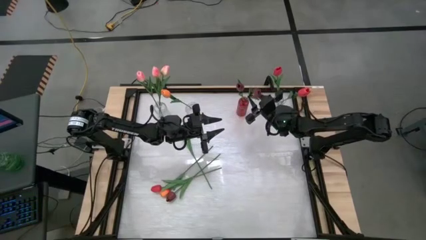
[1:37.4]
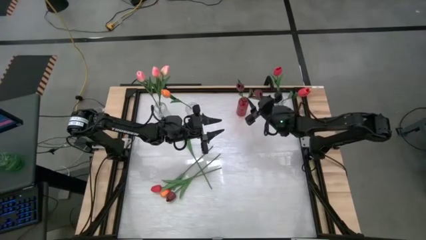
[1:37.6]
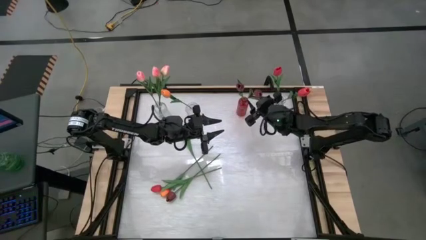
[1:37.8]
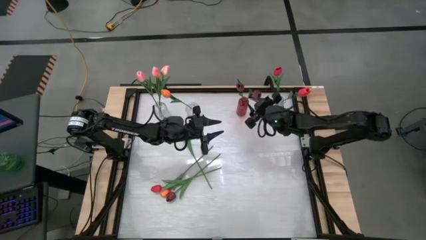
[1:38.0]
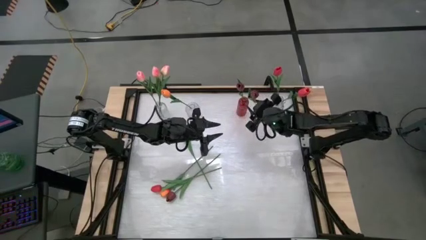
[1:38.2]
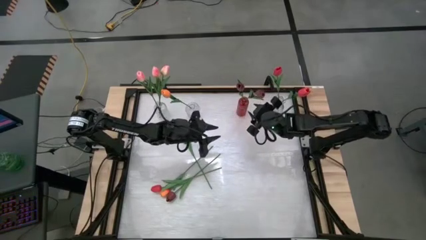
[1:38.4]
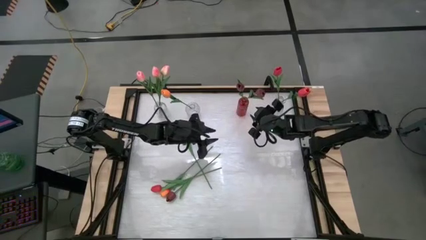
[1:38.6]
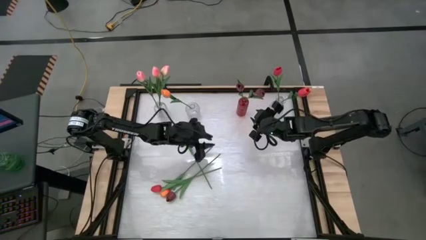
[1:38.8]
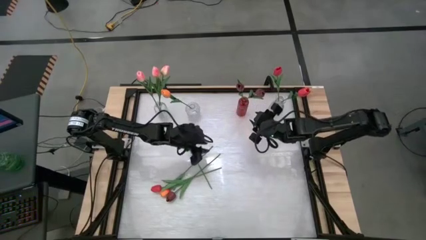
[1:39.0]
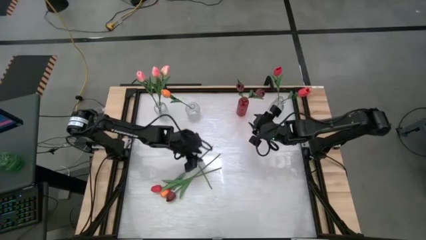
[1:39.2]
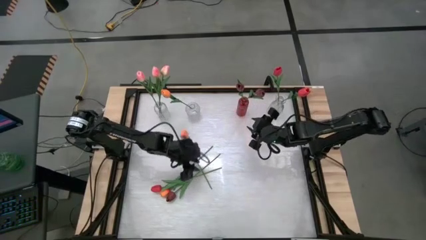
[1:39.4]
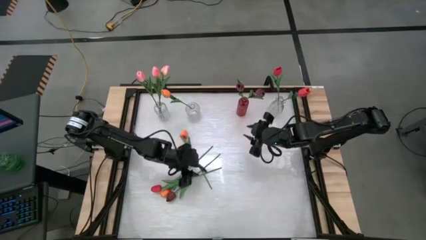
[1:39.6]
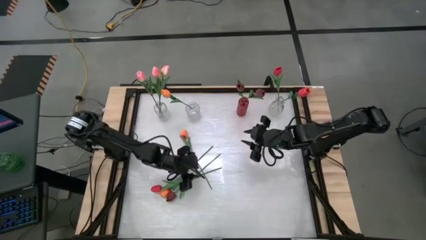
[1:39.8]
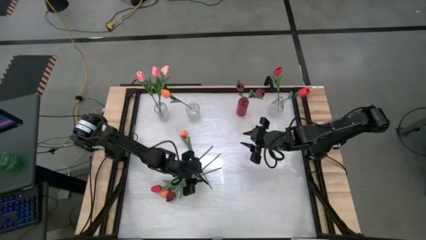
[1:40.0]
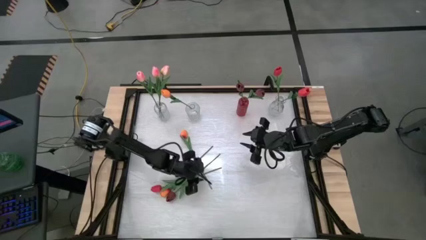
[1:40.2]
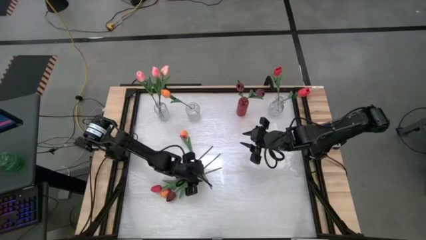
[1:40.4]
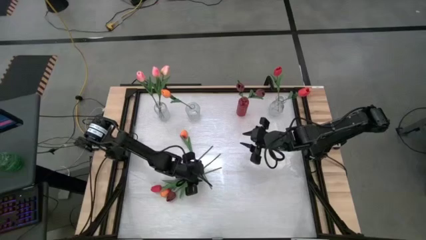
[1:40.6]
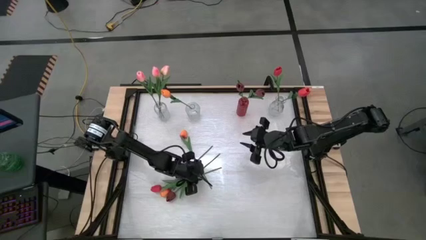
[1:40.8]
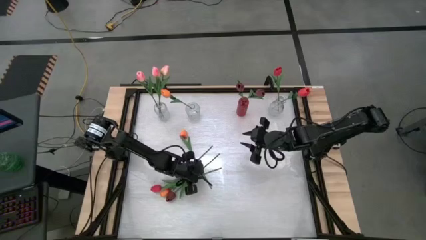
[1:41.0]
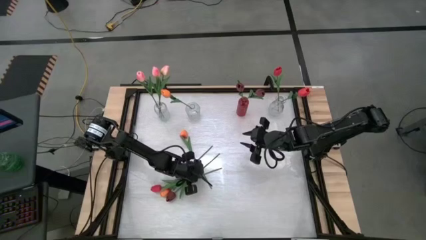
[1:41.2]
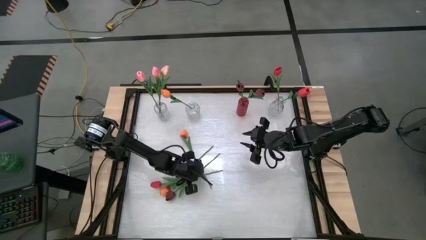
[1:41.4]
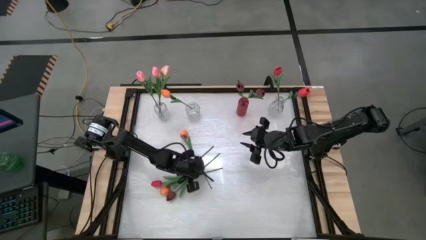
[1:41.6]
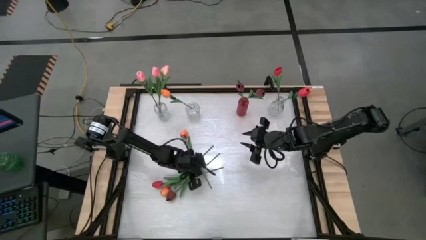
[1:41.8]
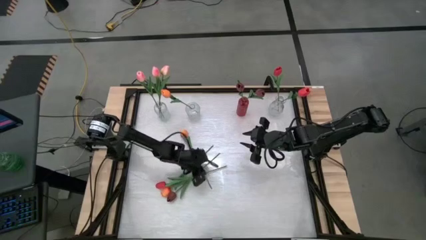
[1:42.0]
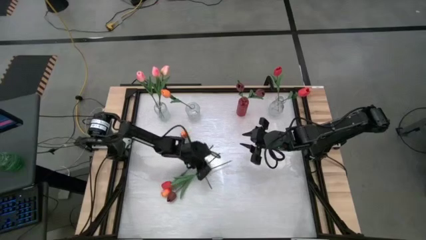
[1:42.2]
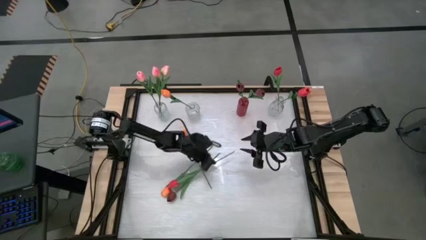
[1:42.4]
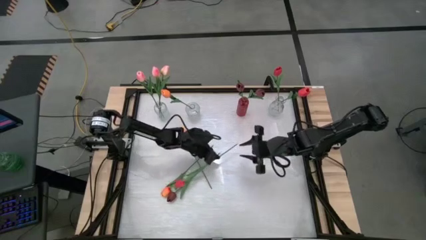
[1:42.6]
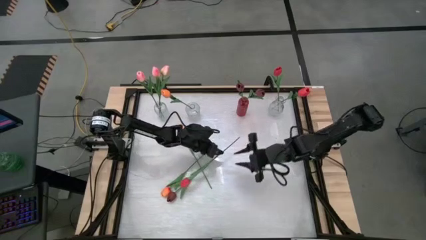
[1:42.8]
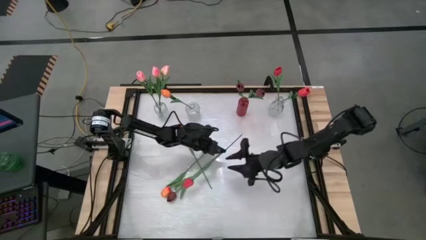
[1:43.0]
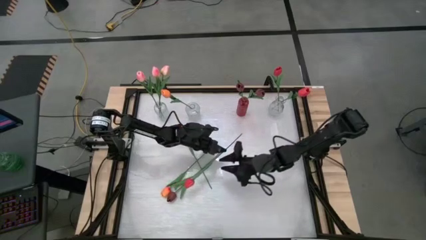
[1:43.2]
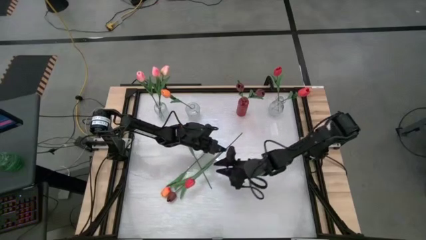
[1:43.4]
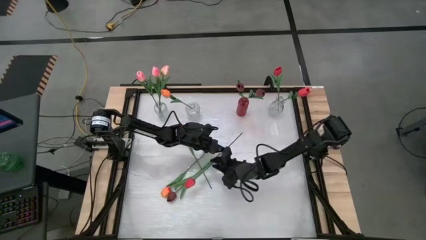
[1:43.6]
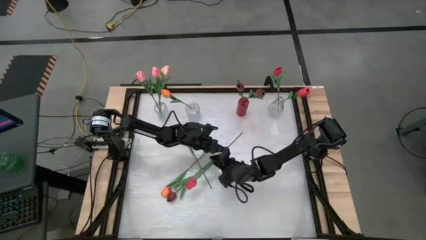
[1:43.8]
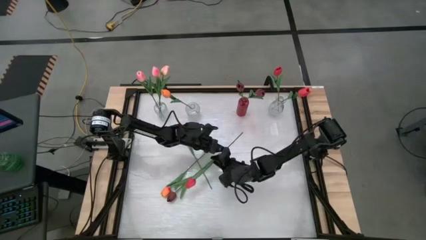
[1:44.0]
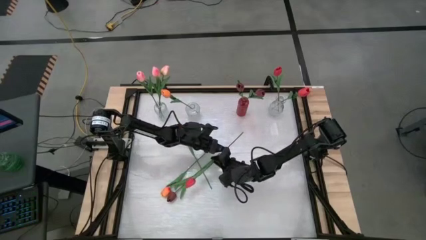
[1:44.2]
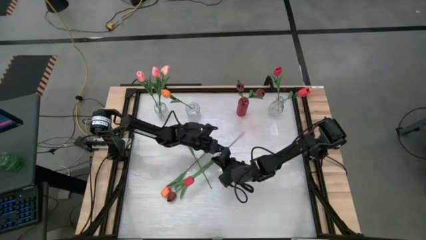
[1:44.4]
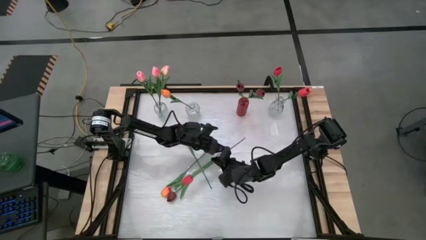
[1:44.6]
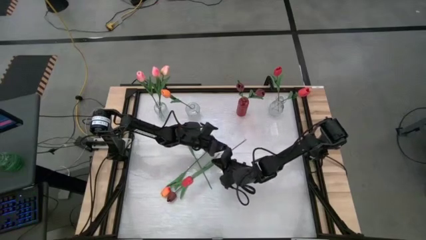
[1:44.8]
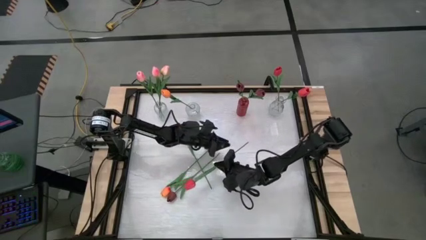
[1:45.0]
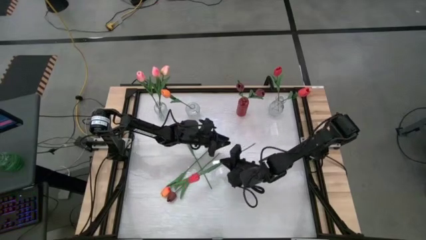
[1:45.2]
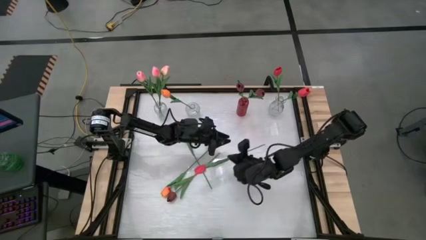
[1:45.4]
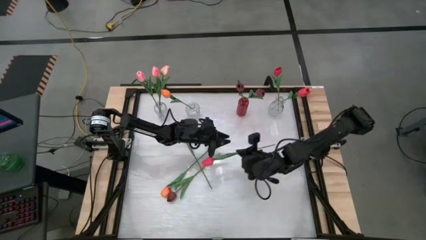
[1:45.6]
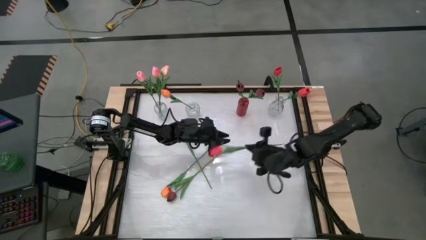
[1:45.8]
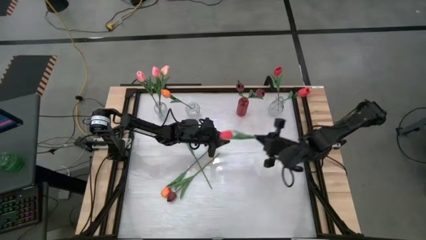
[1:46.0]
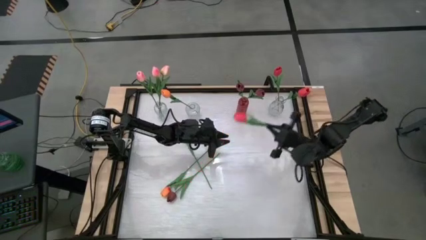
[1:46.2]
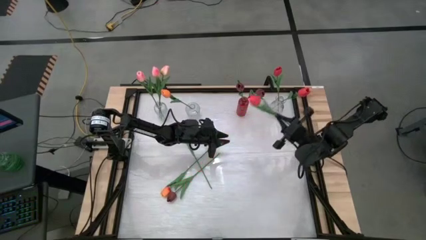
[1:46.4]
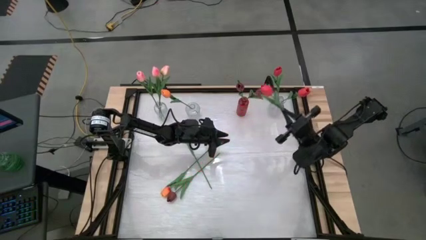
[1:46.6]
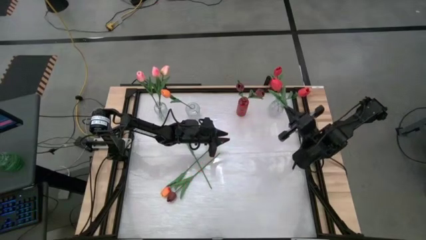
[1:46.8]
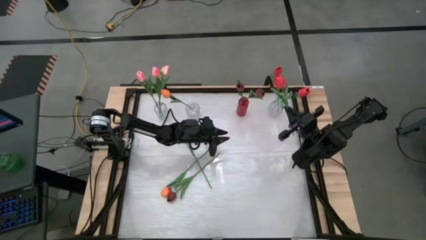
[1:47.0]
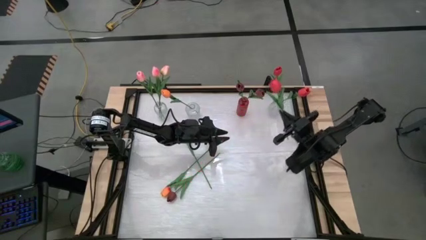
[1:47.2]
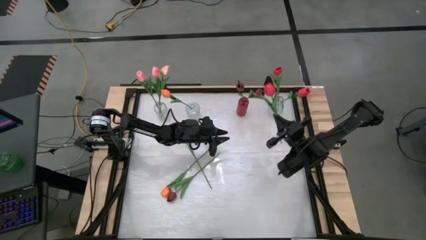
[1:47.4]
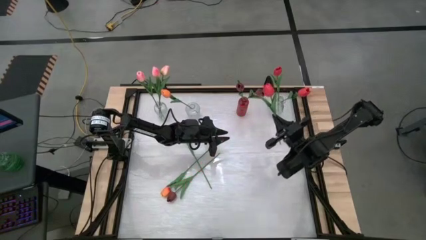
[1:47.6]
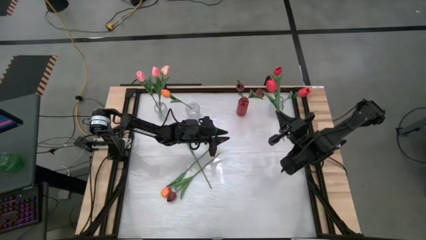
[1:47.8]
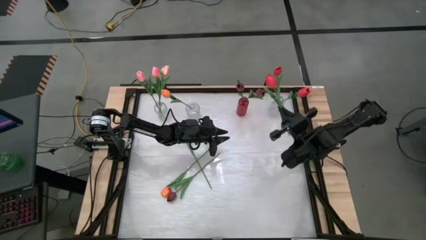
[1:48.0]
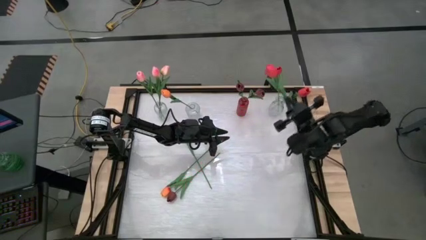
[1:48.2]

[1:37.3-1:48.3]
Task: Sort flowers into vase by color
Put the pink flower into the right transparent vase

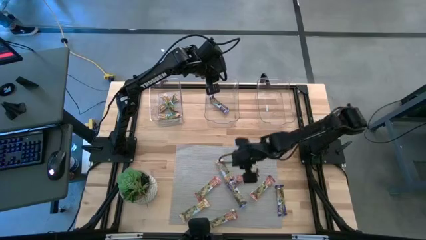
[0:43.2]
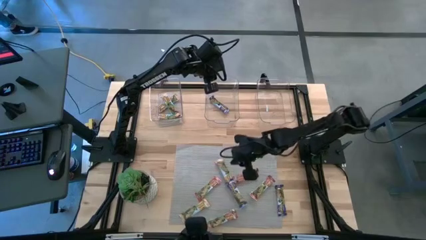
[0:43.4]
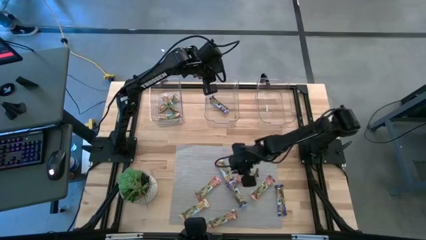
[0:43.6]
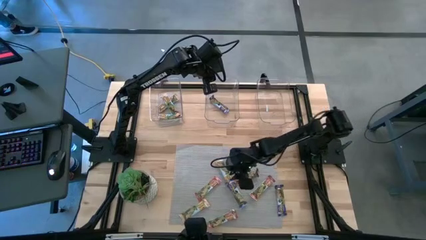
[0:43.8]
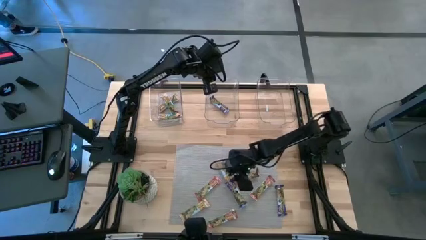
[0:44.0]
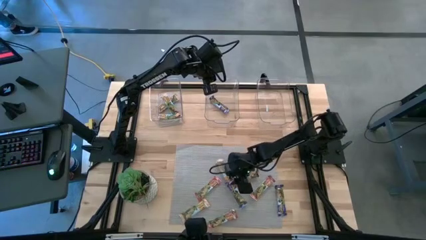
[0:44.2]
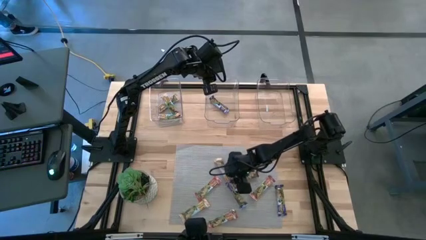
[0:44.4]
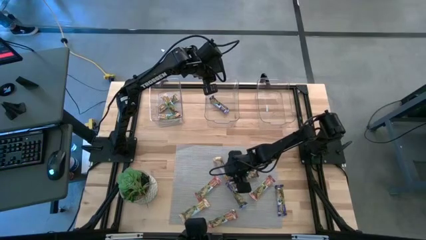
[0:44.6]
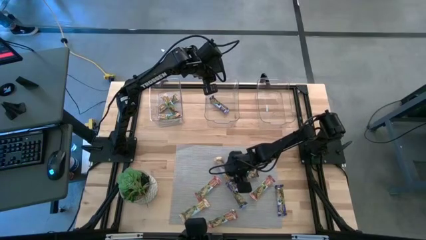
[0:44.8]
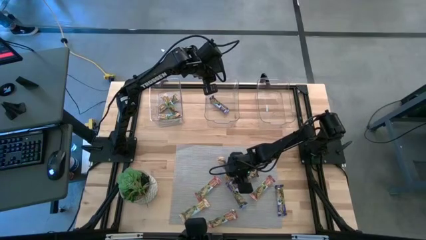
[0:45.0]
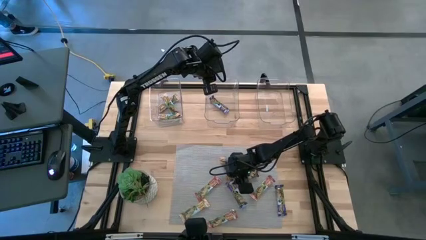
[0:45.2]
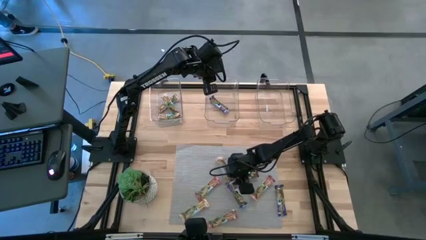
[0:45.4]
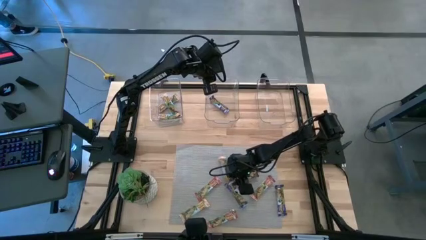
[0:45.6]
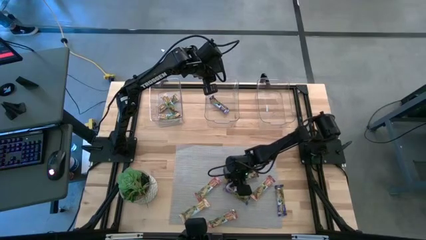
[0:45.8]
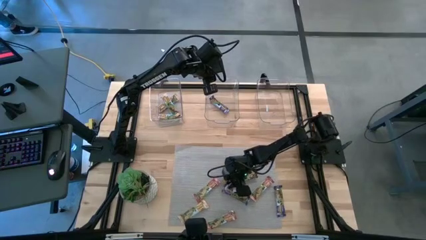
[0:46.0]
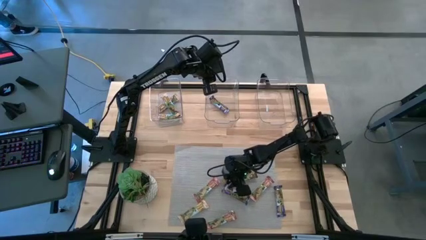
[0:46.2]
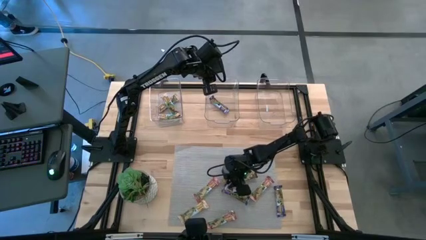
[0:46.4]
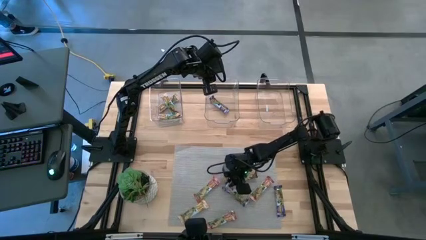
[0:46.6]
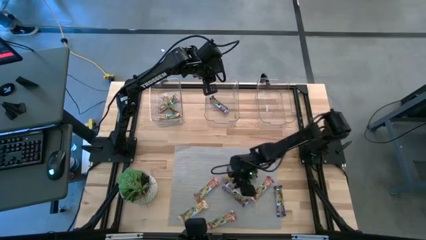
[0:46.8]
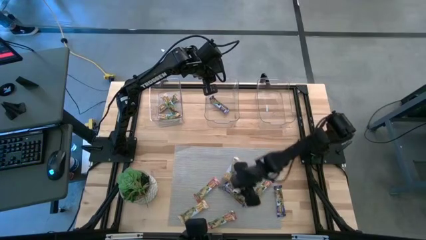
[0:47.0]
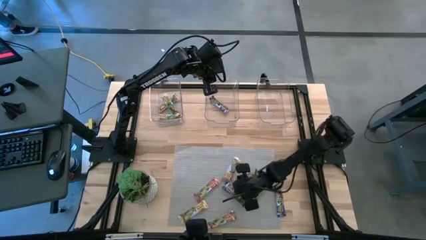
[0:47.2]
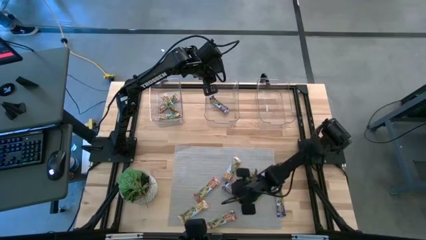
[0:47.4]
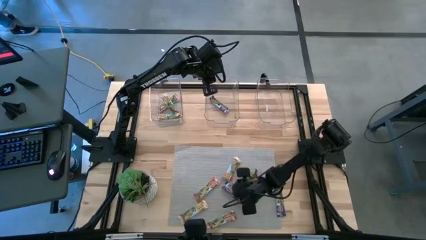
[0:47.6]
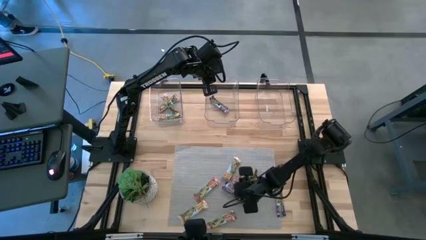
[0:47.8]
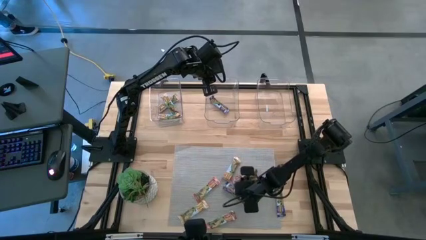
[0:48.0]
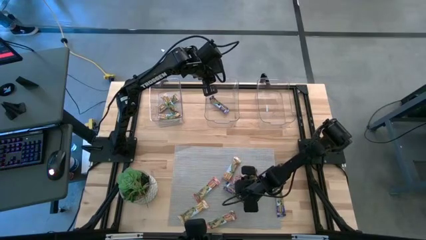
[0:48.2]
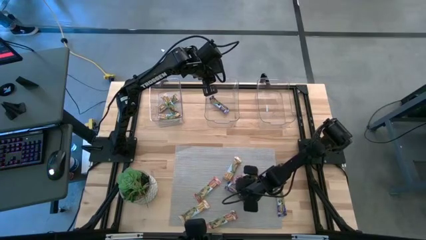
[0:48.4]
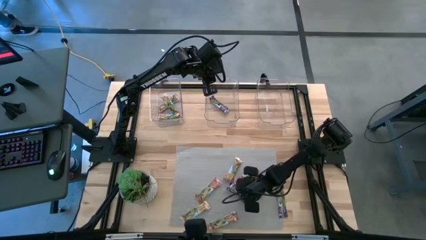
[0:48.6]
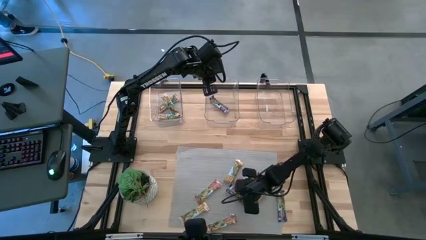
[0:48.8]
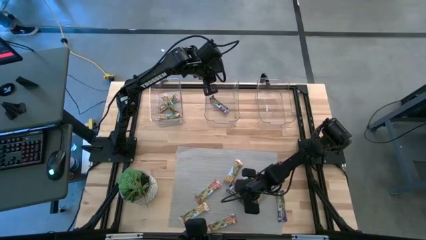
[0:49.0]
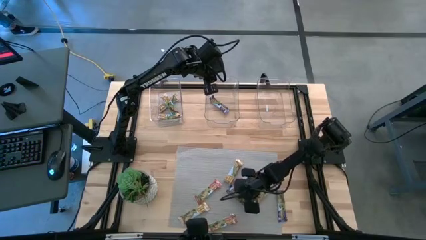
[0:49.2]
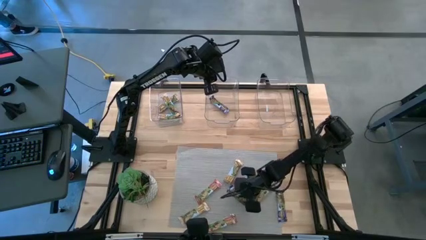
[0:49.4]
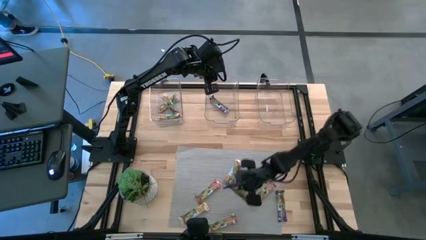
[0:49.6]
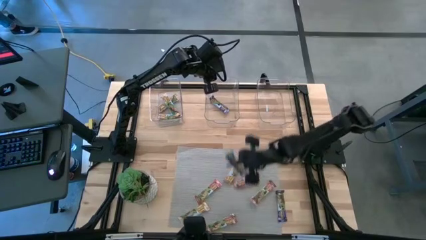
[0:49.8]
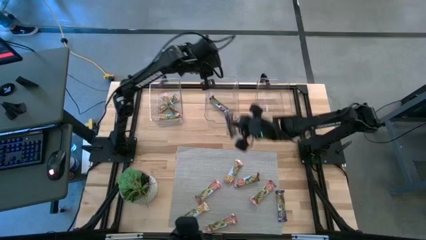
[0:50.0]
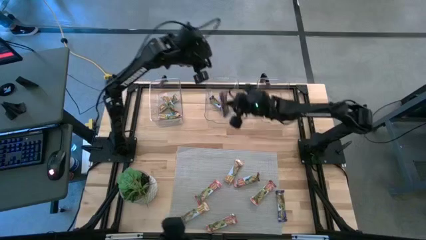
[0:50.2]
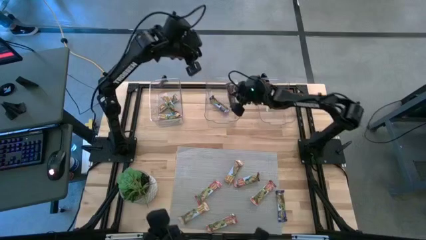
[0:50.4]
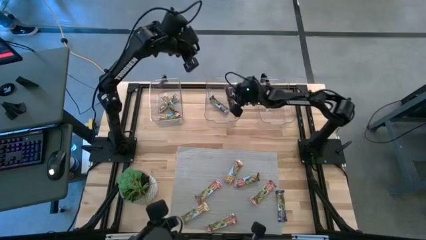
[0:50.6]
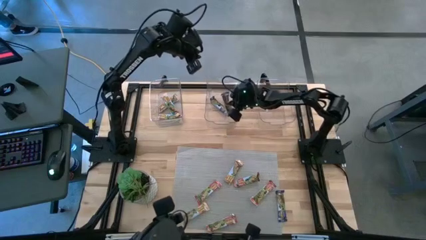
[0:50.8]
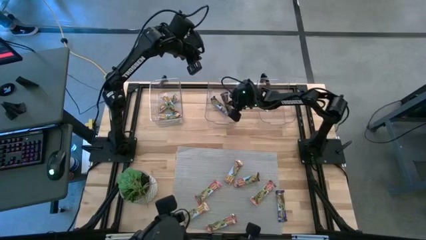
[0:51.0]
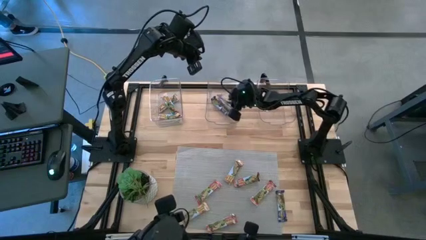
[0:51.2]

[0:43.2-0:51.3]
Task: Pick and place Granola Bars by type
Put the left blue granola bar into the middle transparent bin
